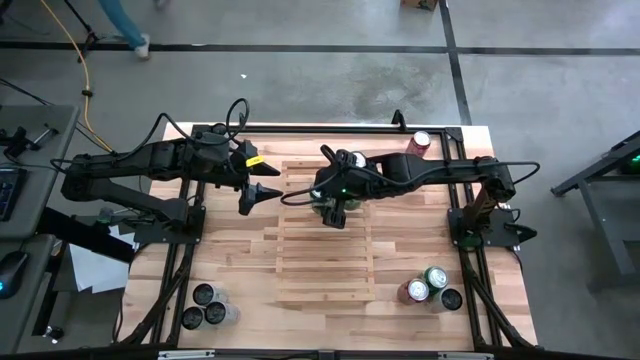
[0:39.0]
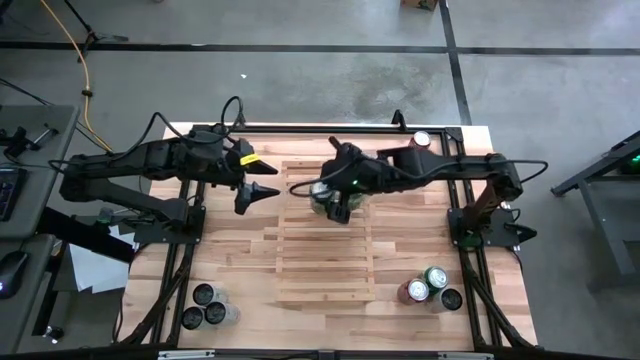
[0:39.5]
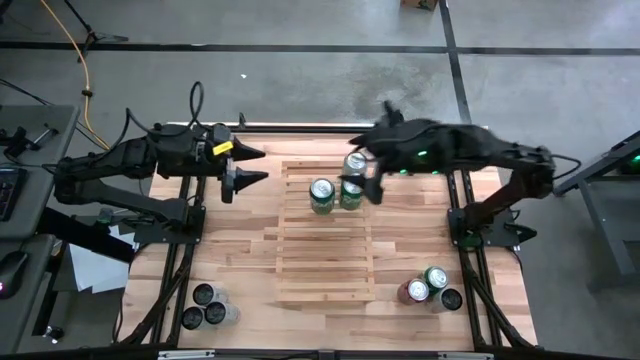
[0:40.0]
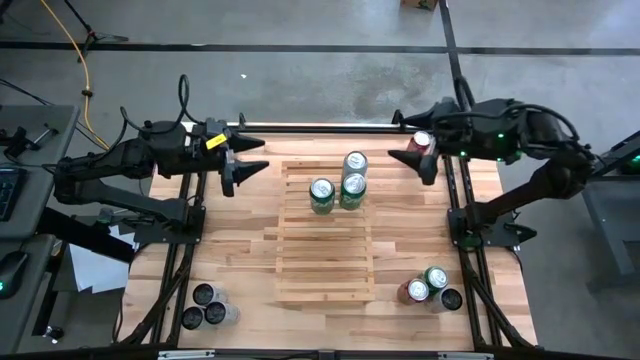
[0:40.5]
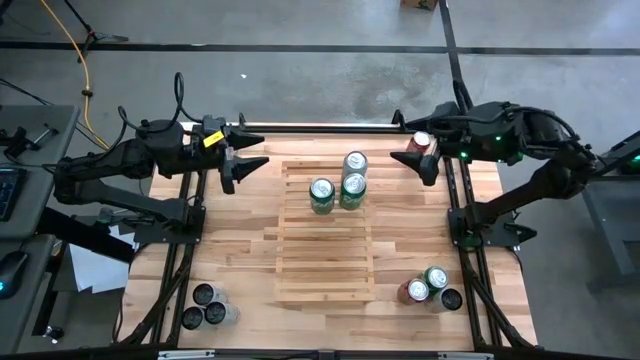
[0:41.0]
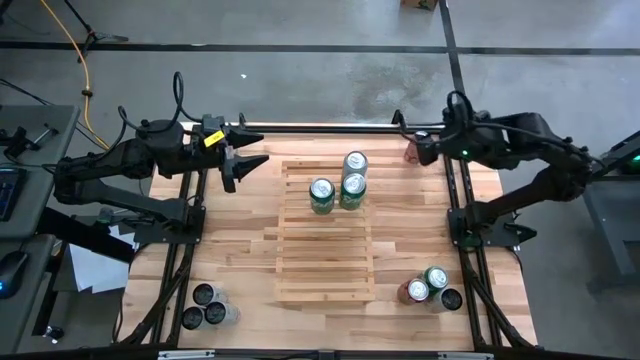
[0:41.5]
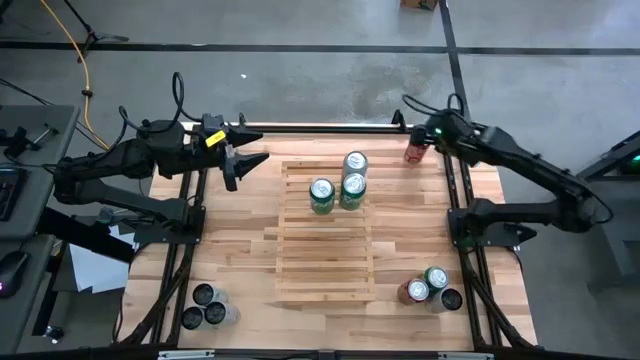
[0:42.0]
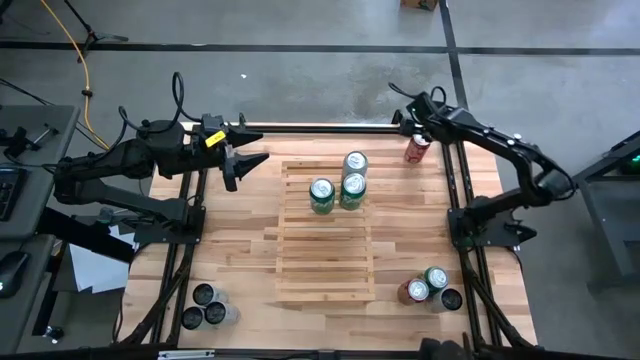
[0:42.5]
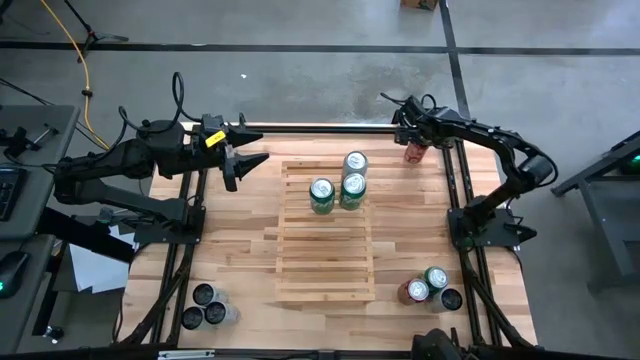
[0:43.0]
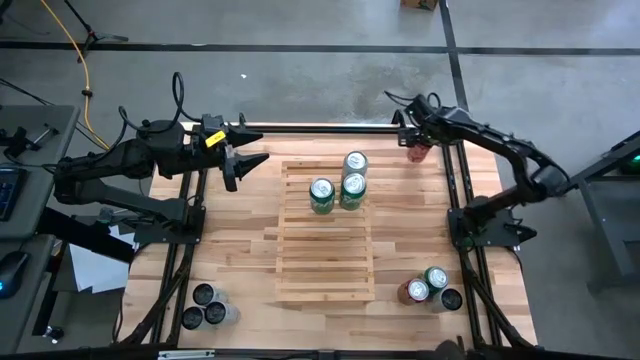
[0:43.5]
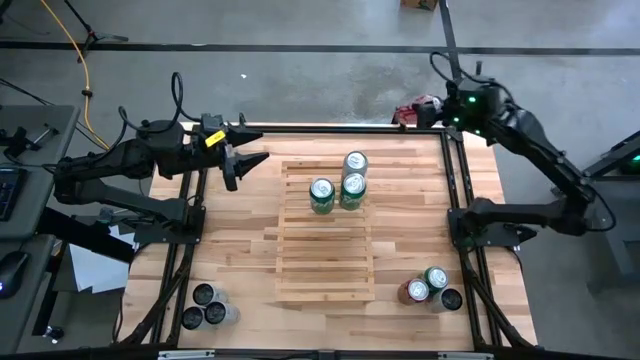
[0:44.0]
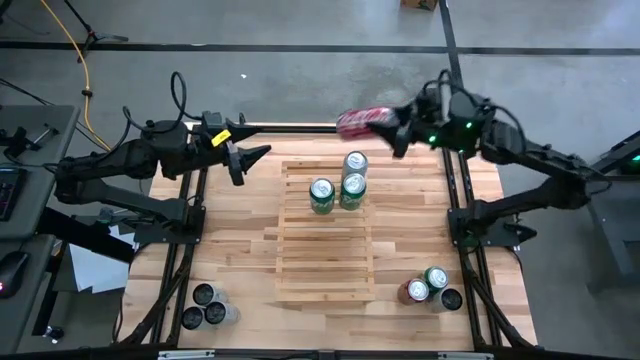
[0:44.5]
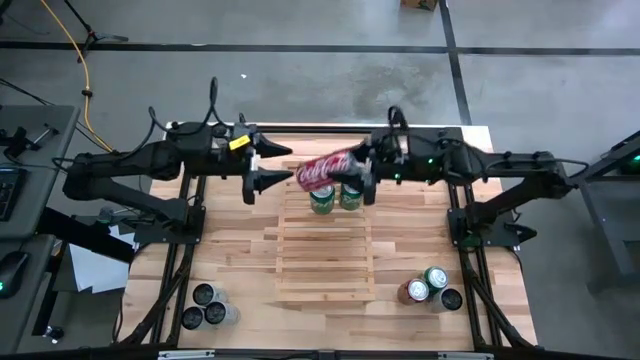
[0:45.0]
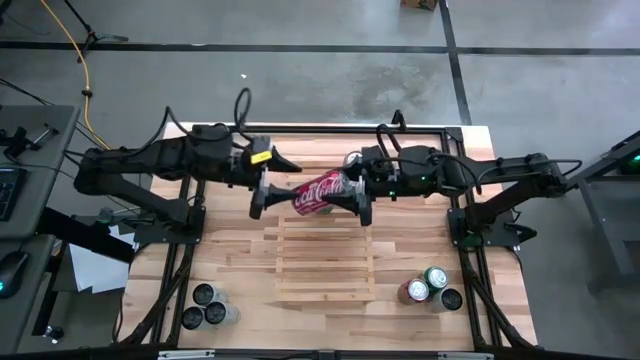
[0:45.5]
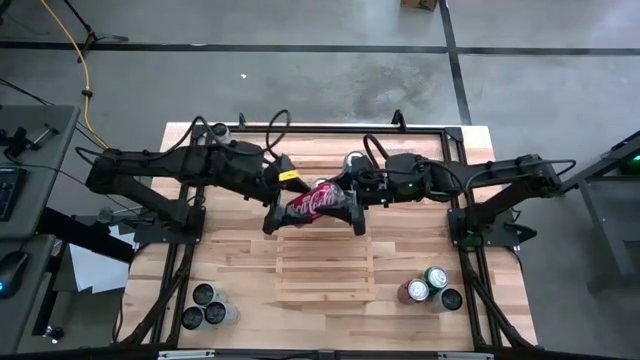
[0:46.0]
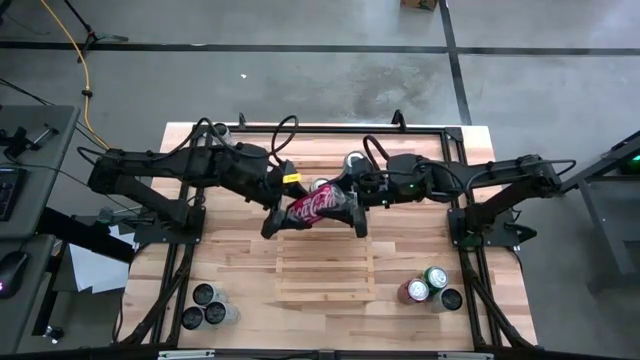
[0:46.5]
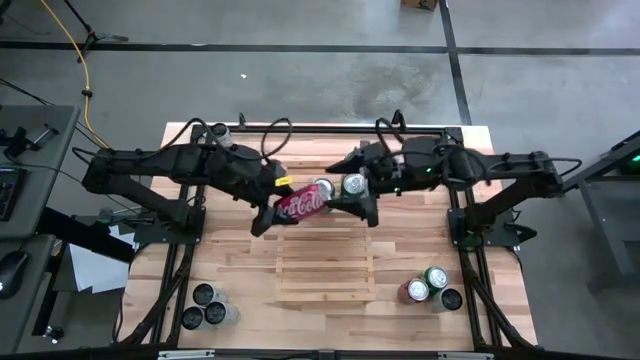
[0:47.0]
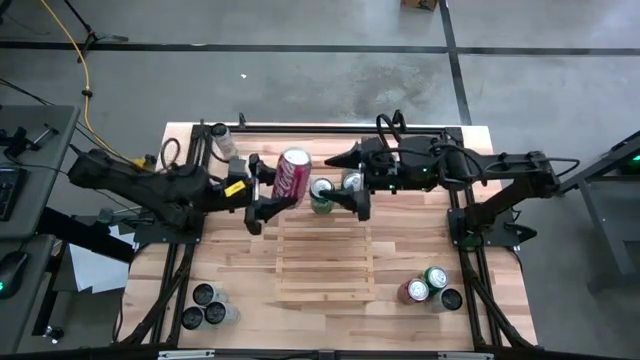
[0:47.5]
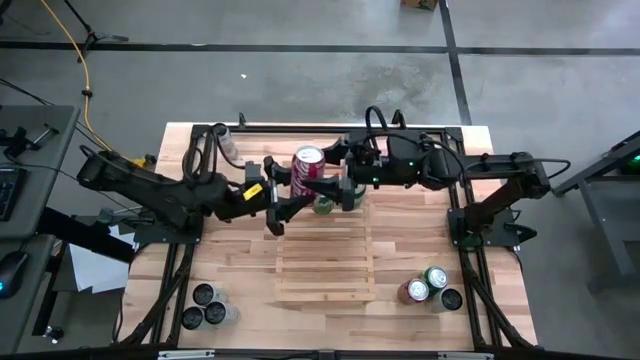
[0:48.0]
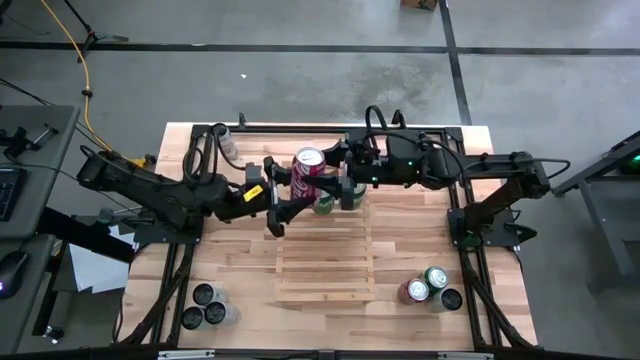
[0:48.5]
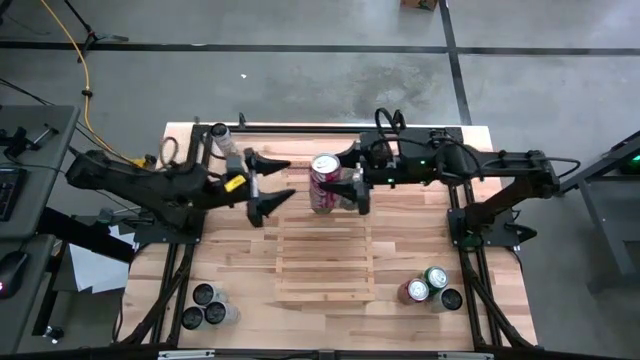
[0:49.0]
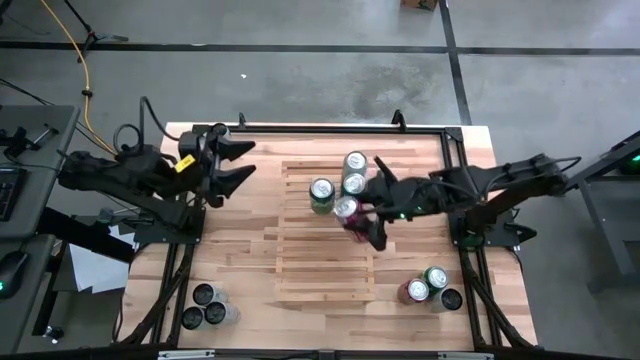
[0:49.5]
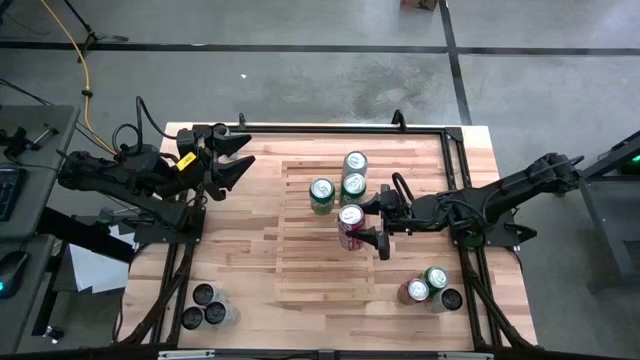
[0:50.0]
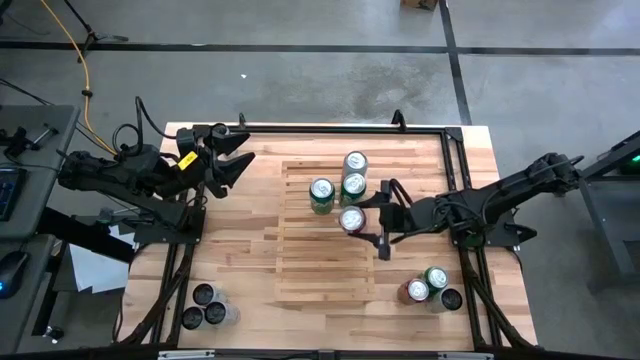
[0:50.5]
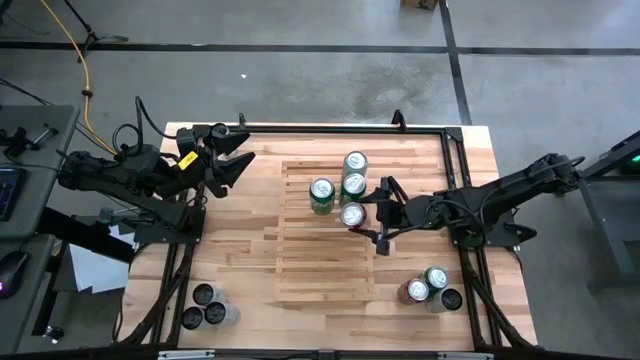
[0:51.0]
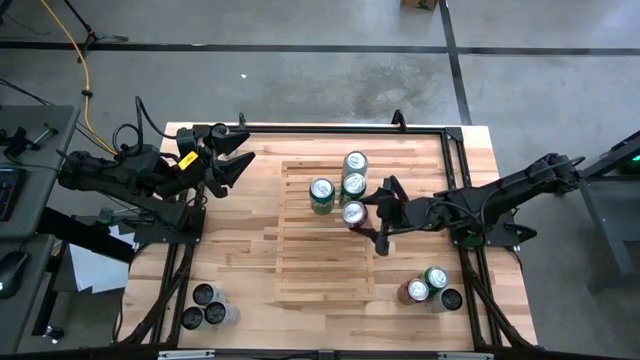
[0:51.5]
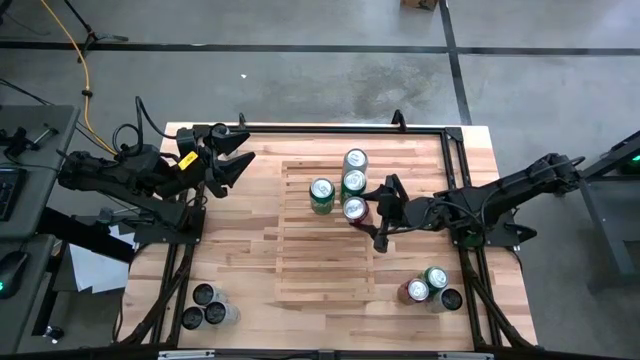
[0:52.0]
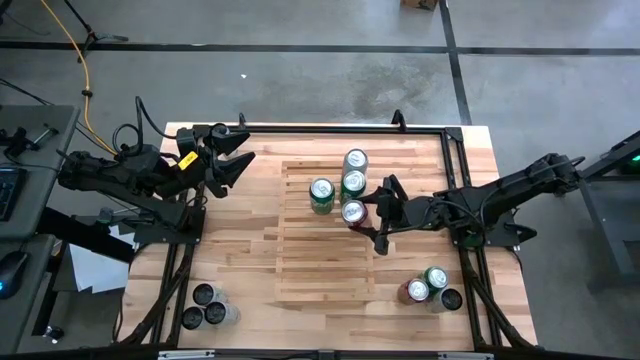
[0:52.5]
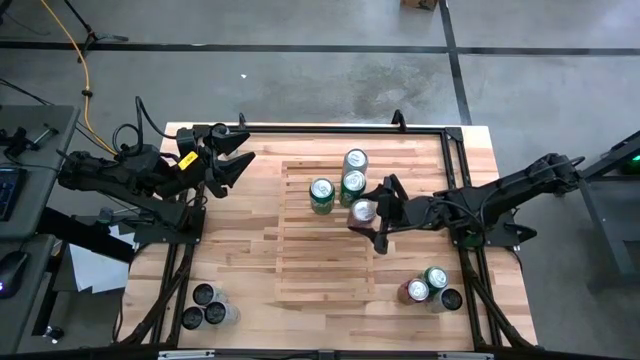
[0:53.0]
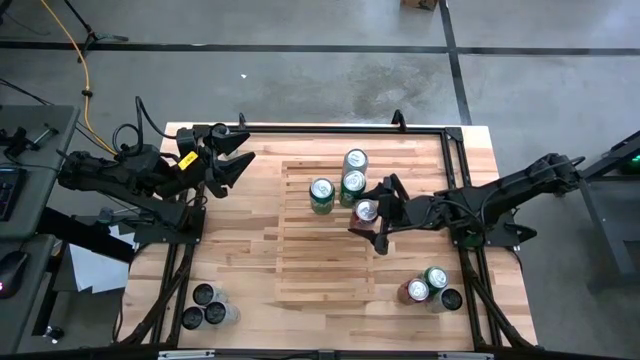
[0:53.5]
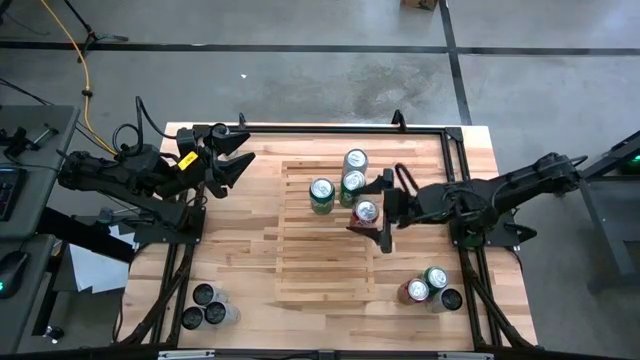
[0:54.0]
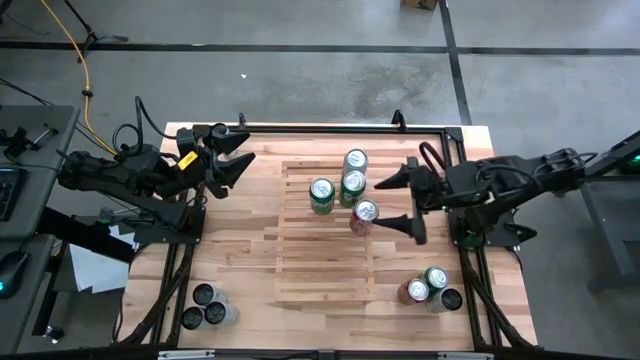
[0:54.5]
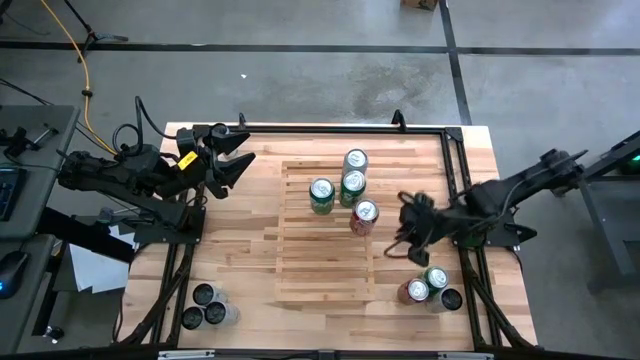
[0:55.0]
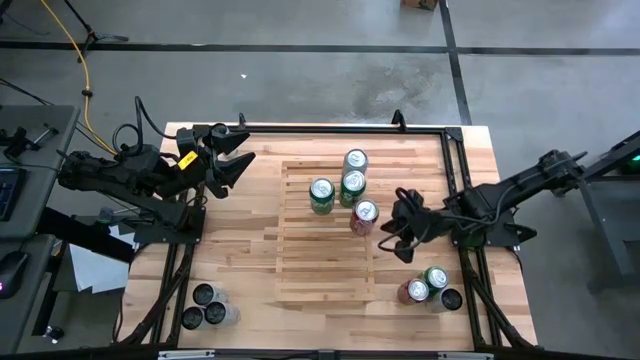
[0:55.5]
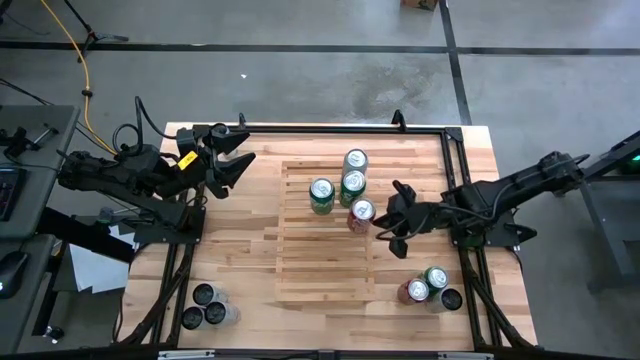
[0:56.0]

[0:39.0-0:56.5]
Task: Place canned beverage on shelf
Put the top red soda can on the shelf

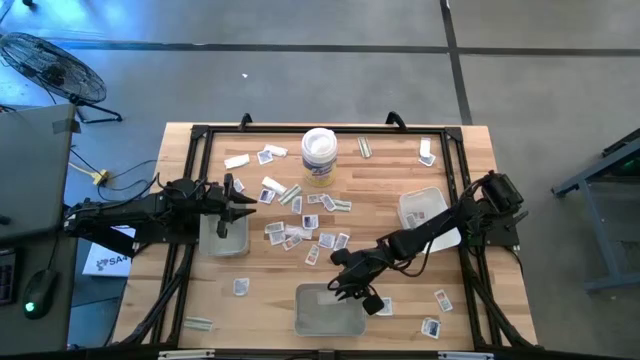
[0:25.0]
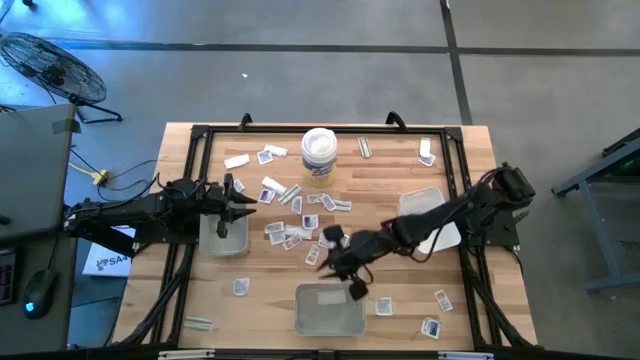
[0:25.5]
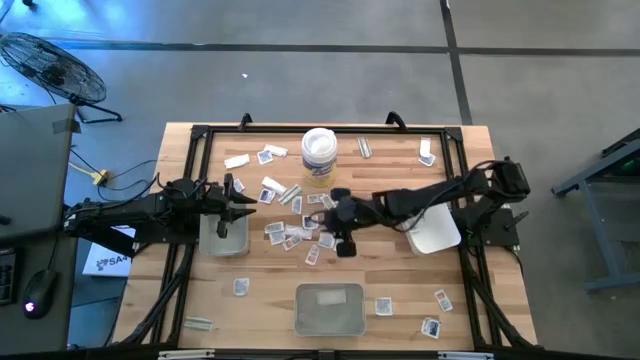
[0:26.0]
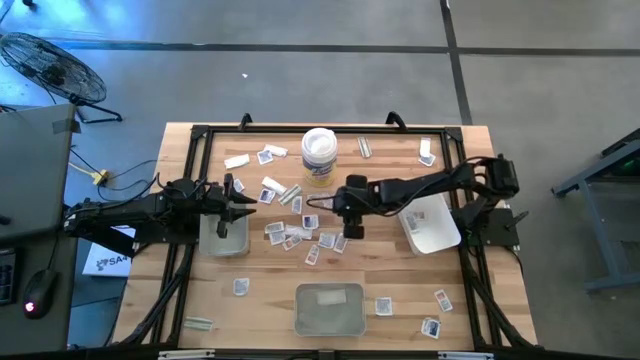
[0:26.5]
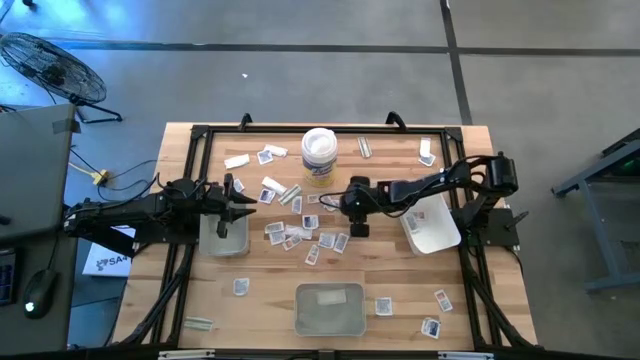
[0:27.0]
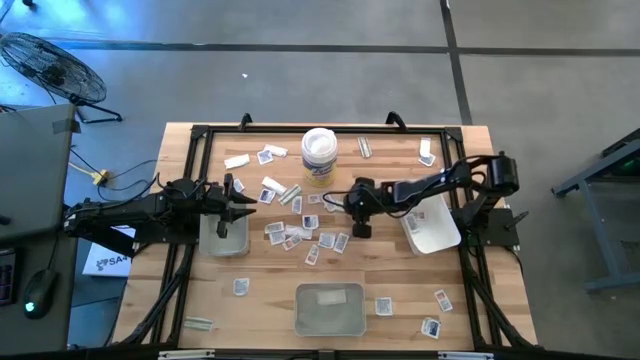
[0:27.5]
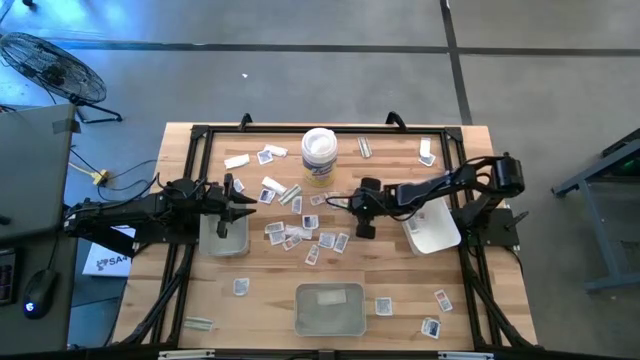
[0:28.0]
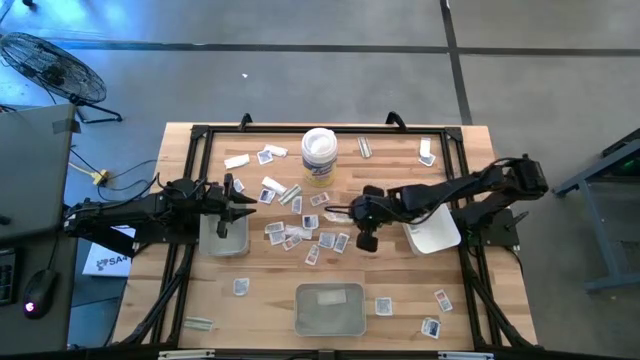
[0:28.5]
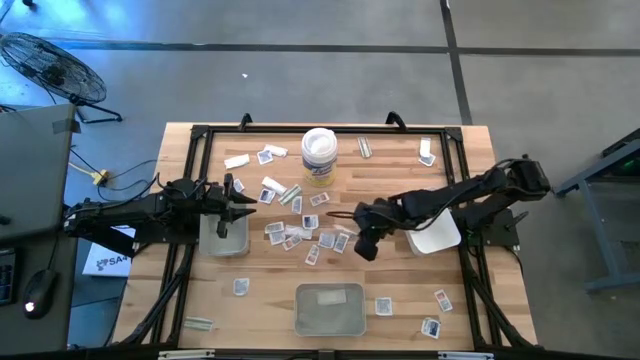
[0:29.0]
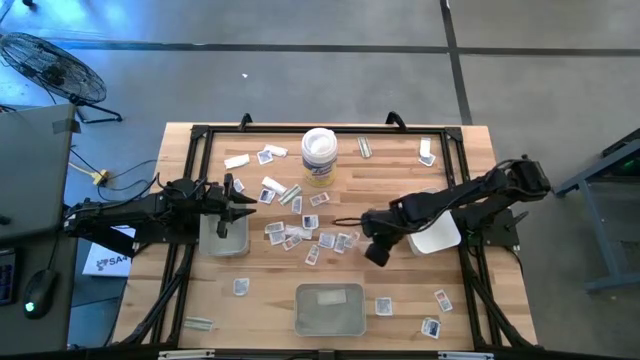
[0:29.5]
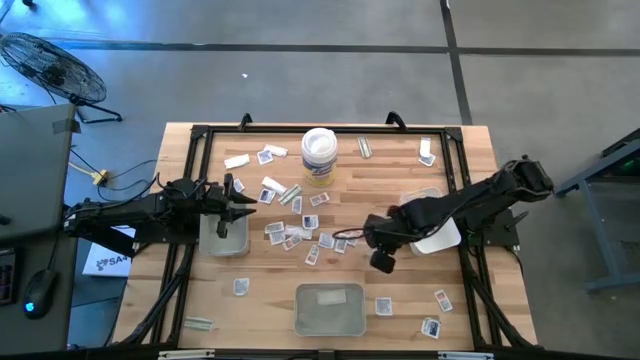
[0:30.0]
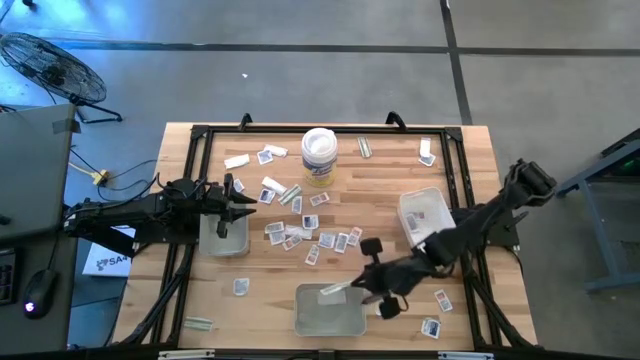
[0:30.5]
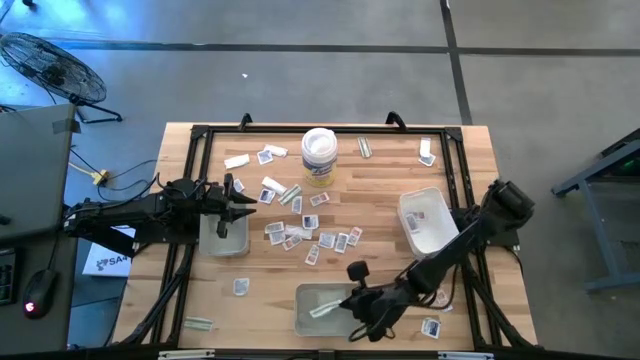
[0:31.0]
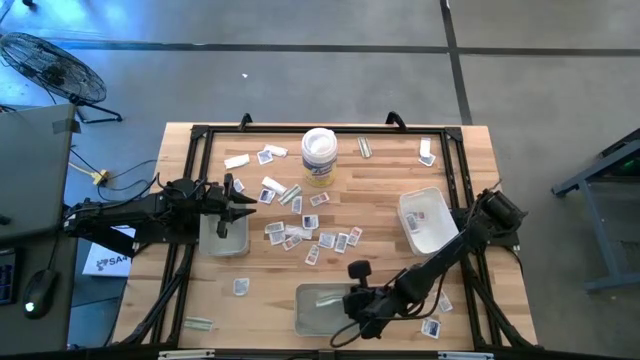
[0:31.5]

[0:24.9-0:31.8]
Task: Pick & Place First Aid Supplies
Put the green bandage pack into the bottom gray bin
